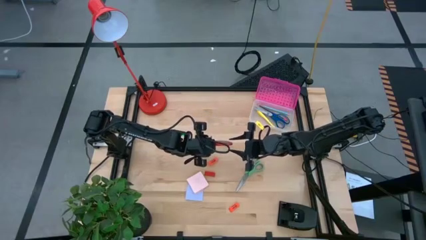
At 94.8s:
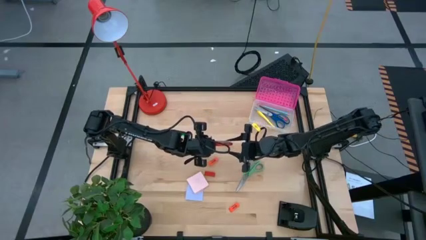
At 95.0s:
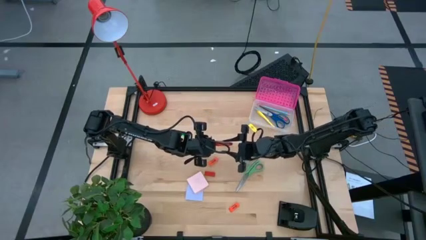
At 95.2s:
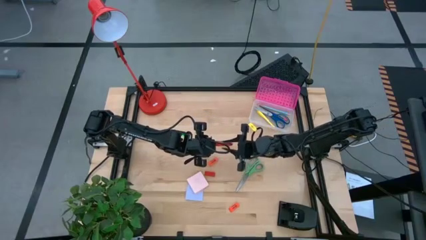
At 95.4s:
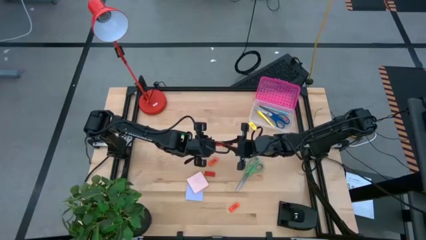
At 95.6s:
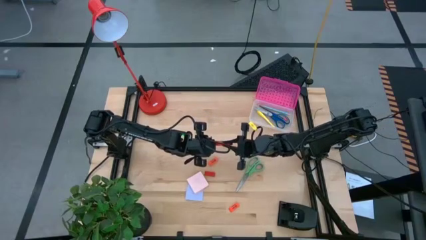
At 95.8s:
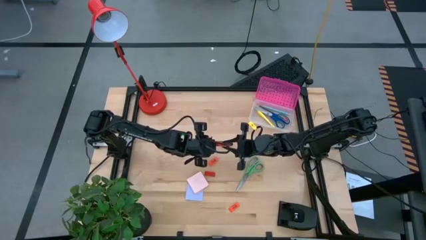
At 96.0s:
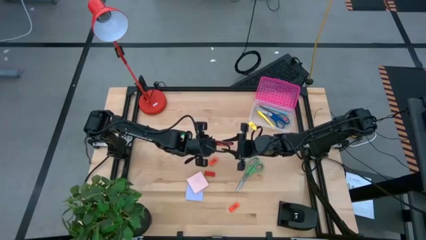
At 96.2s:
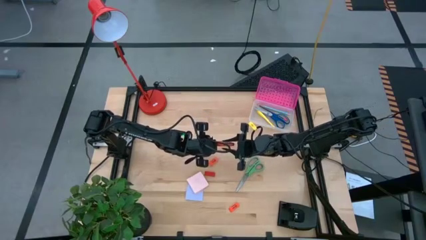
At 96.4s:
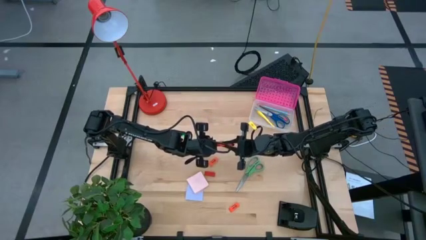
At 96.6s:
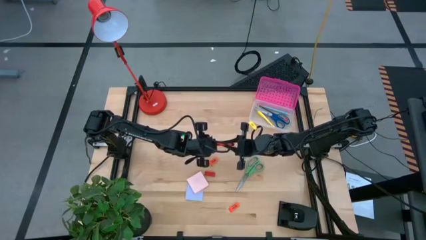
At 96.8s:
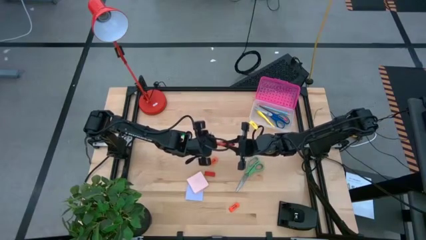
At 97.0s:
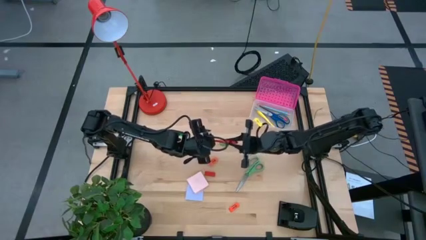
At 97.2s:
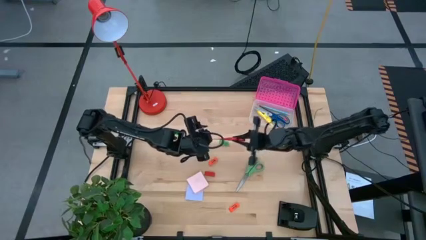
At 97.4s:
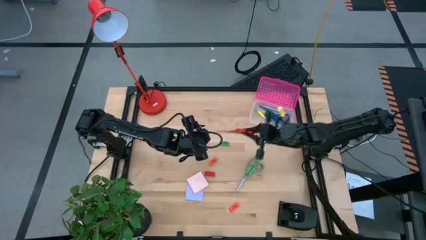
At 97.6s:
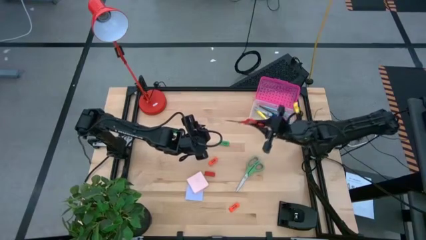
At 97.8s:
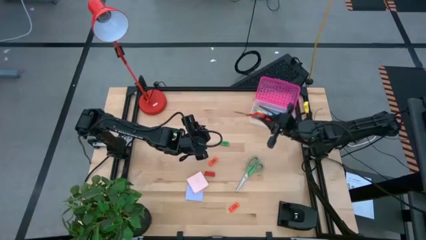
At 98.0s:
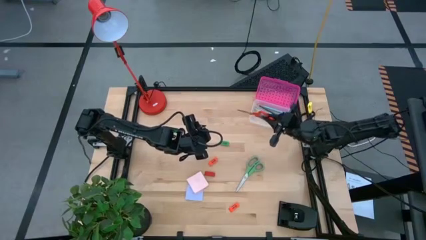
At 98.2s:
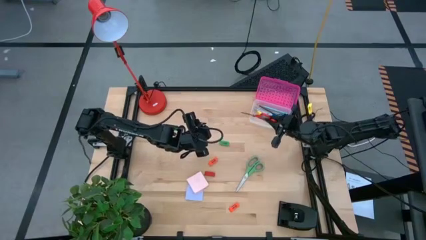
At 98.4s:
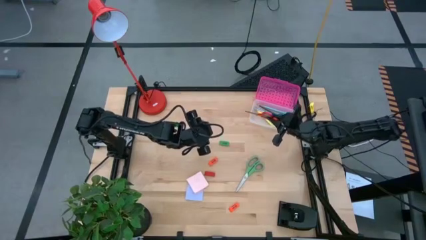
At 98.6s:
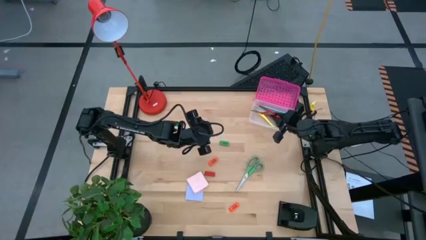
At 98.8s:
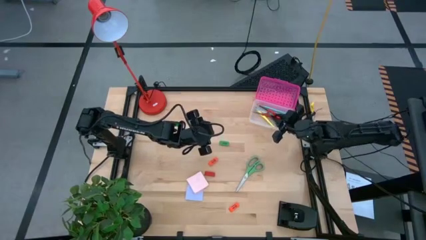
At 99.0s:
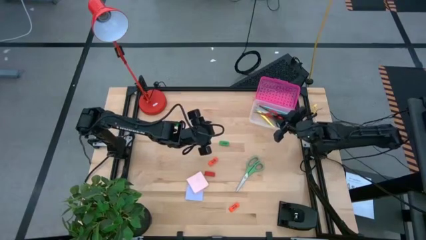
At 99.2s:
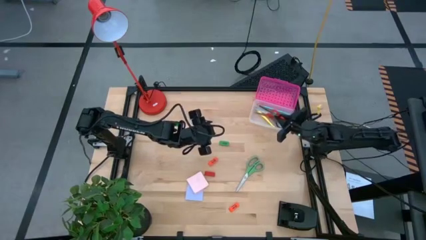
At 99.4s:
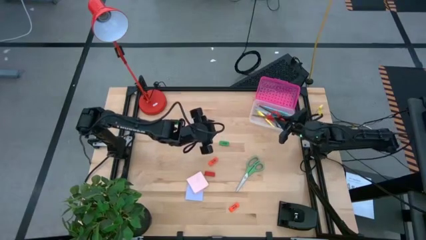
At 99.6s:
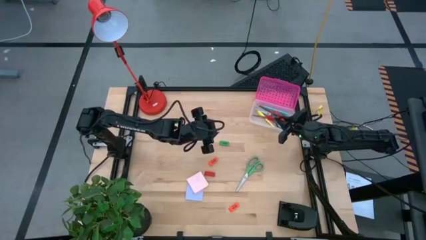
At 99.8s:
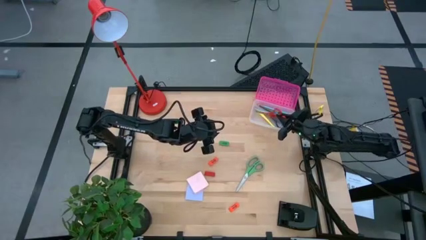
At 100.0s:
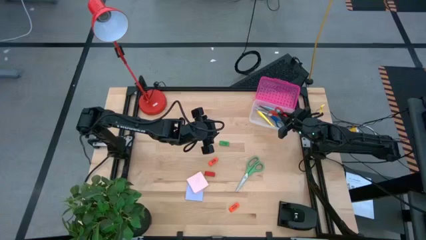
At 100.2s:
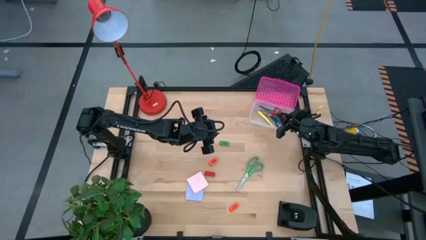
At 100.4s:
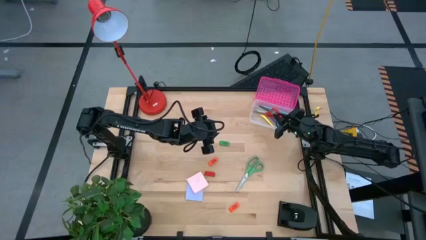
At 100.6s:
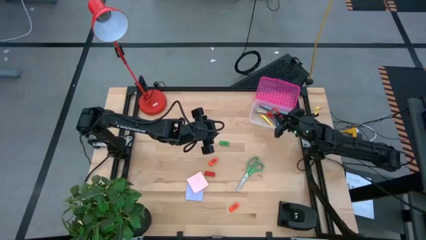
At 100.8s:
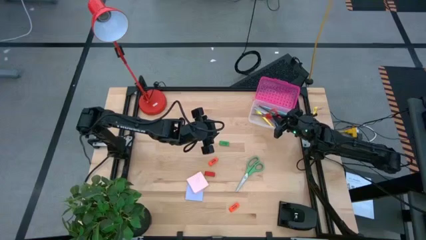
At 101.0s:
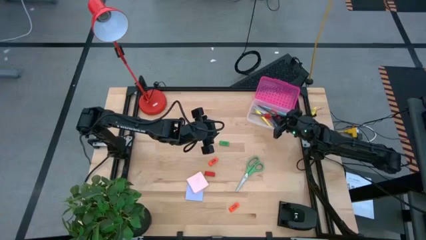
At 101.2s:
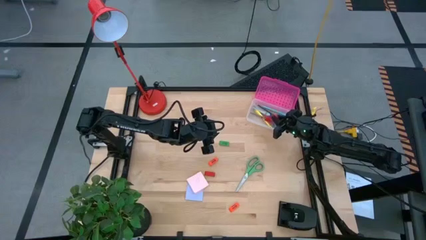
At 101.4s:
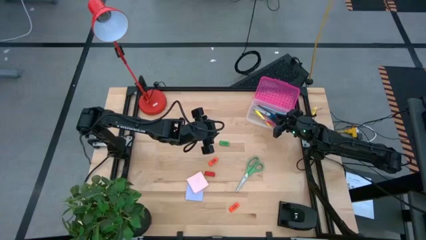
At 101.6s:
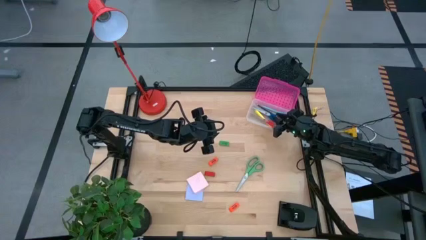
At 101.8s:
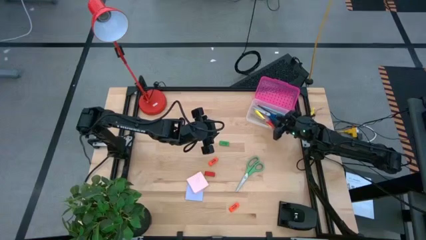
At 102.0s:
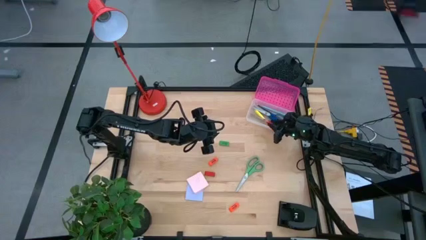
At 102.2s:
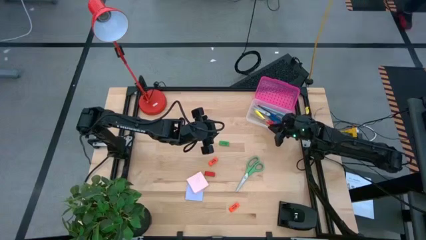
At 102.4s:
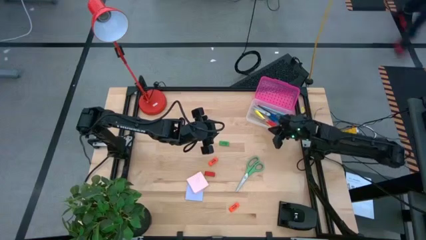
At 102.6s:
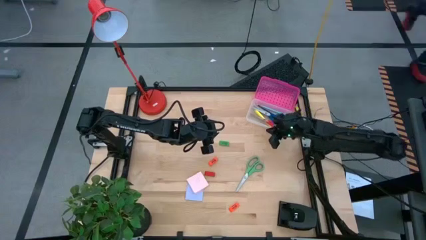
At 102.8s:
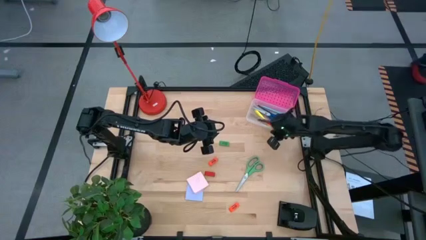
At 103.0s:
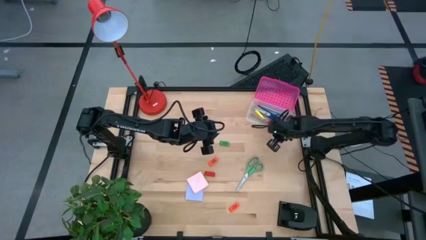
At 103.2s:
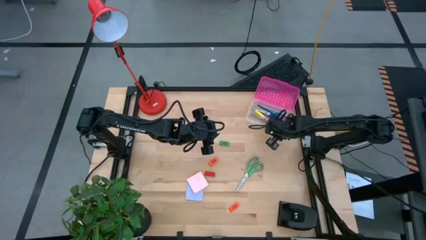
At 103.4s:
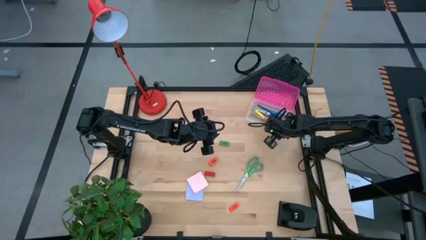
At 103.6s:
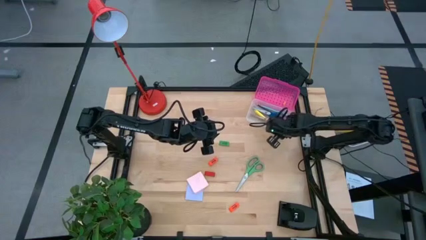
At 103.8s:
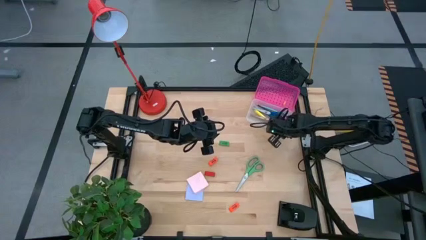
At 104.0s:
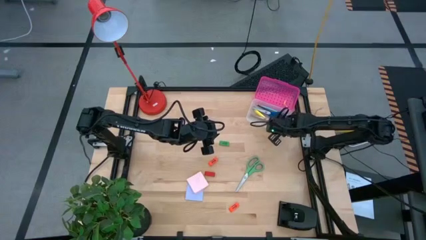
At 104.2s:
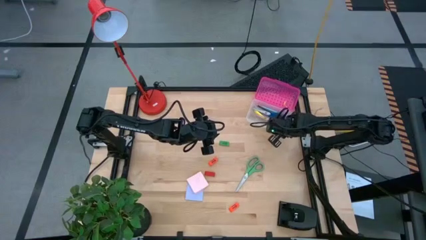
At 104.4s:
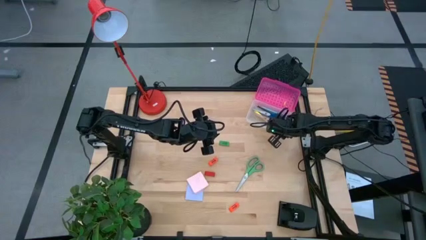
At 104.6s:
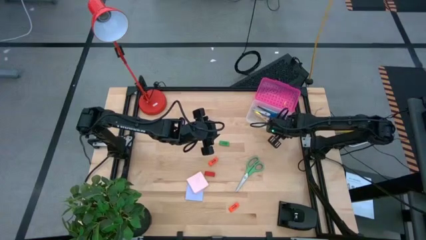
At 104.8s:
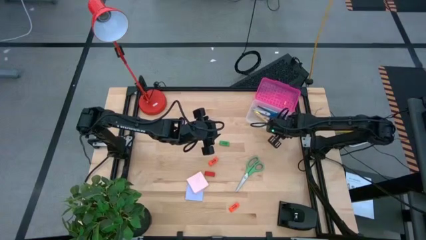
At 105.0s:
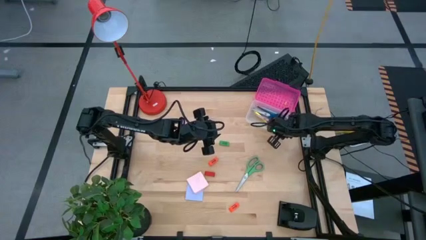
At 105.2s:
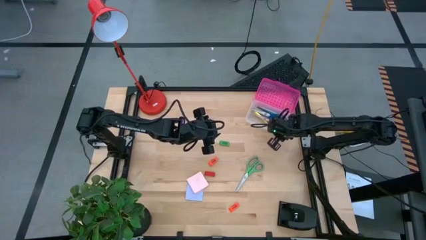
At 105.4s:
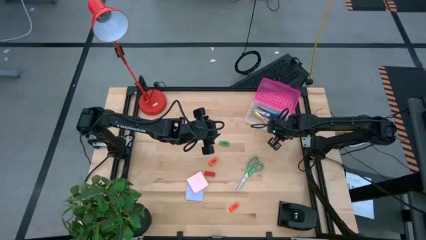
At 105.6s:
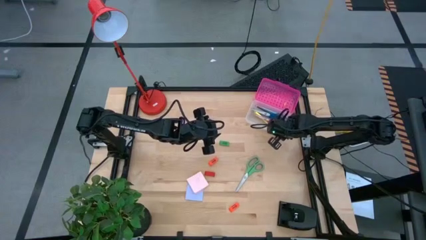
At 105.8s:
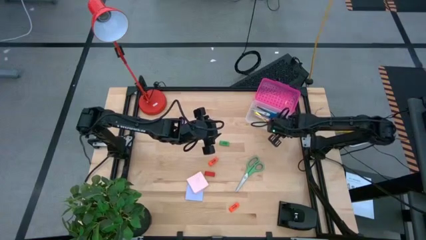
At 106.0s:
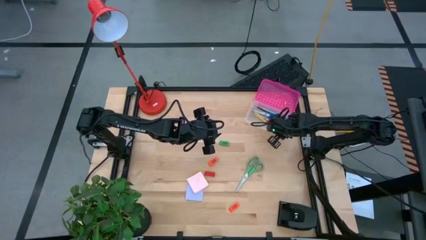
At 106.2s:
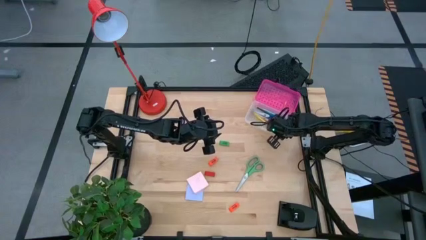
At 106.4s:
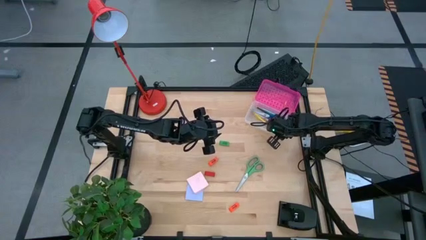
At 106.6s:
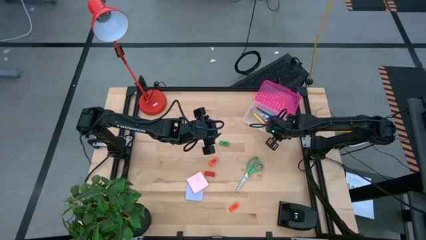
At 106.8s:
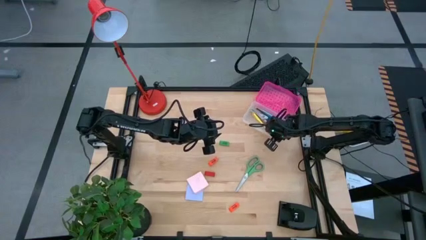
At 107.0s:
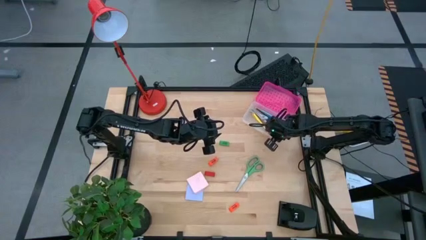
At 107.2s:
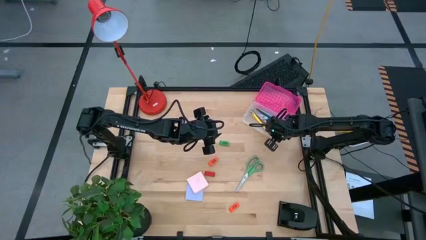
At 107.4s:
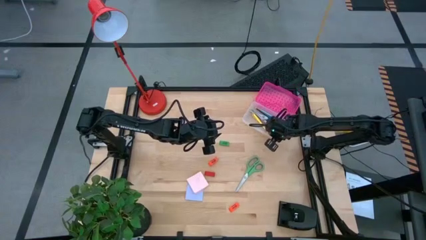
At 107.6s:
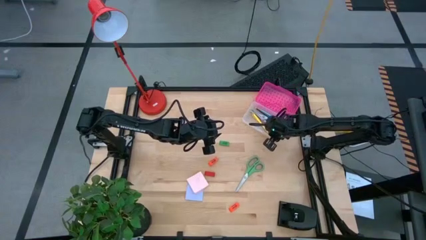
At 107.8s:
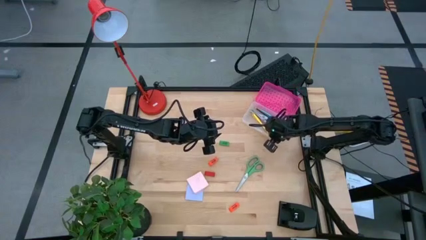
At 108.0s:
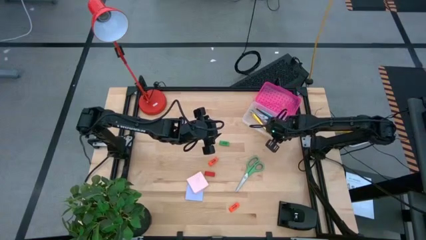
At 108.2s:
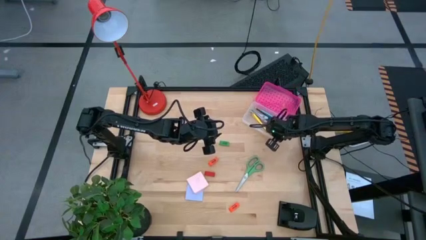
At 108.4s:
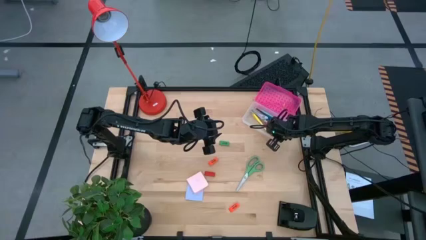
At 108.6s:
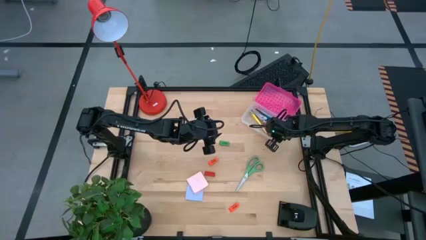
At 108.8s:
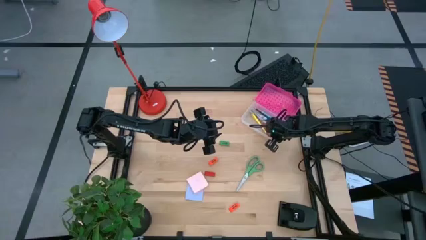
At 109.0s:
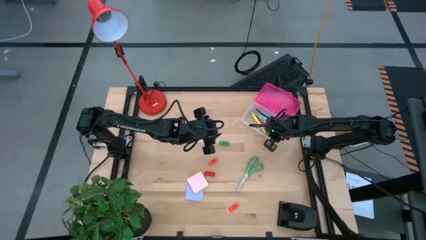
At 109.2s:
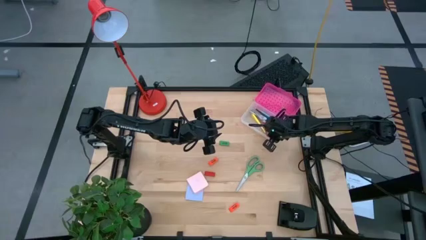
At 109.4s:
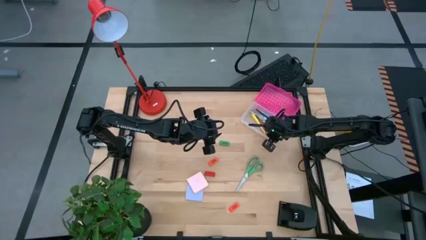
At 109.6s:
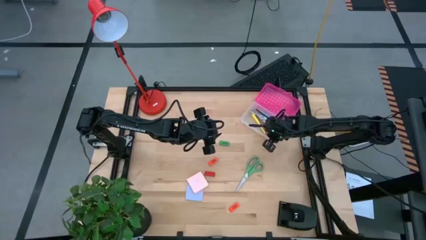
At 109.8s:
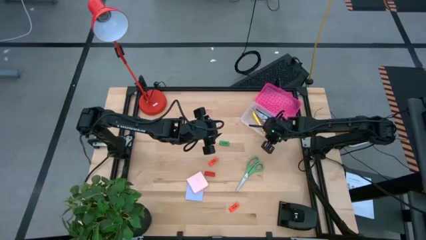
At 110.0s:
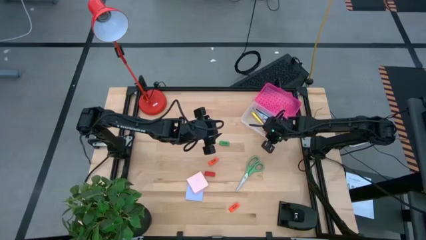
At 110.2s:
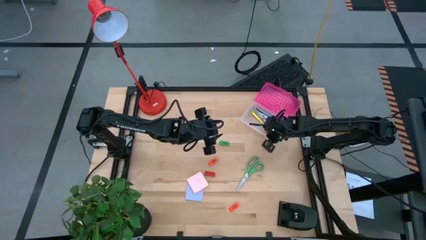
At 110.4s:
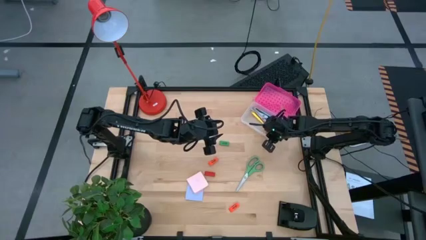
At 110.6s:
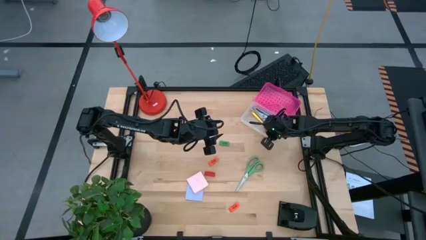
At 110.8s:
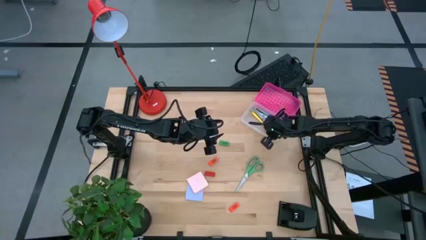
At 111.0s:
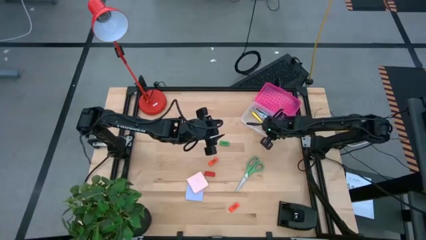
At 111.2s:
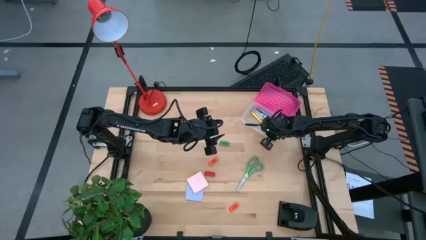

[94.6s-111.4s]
Task: Pack school essentials
Put the orange scissors into the supply box
